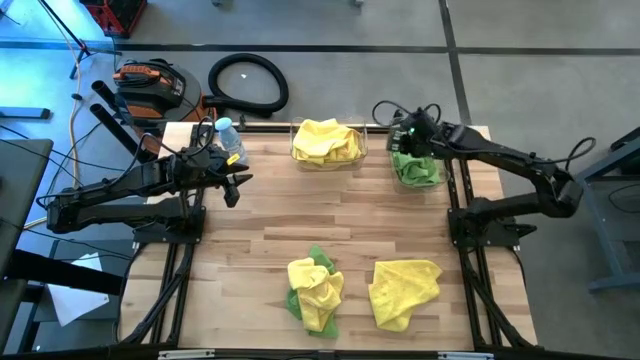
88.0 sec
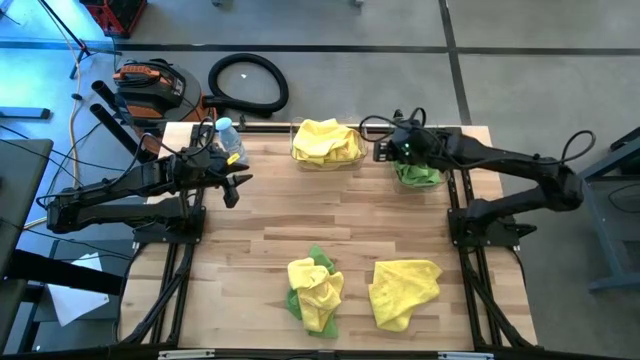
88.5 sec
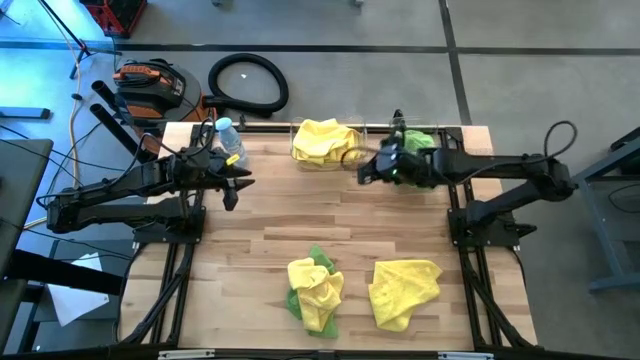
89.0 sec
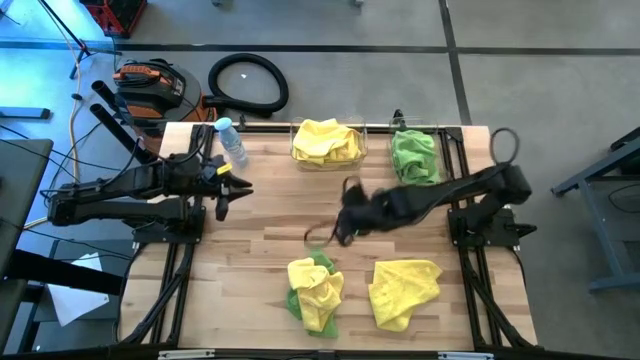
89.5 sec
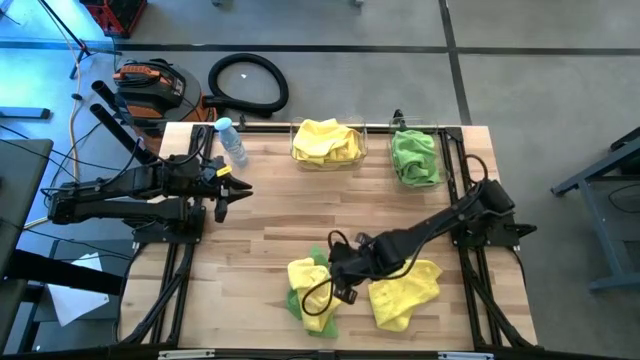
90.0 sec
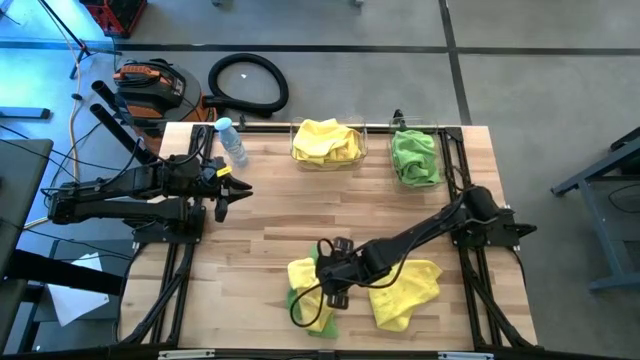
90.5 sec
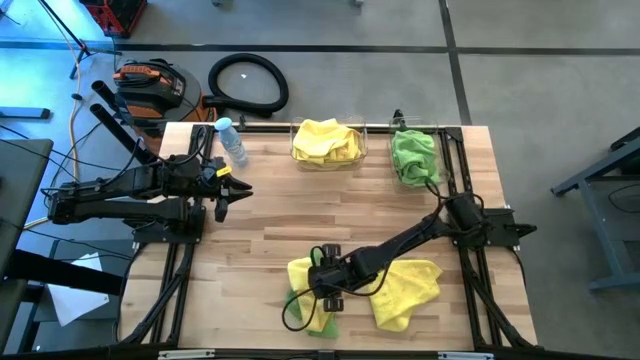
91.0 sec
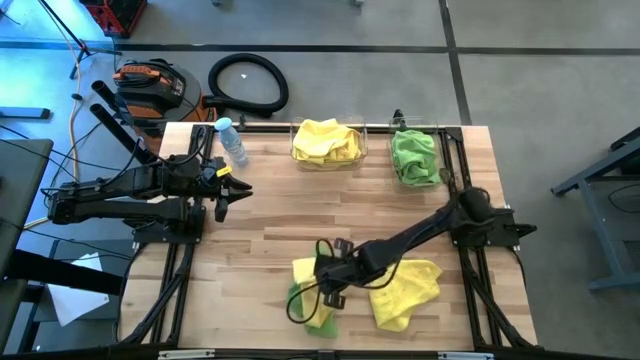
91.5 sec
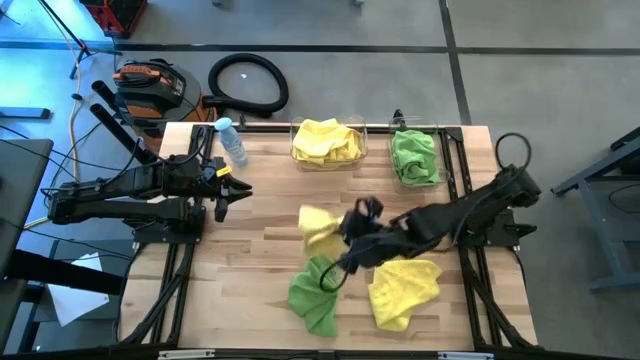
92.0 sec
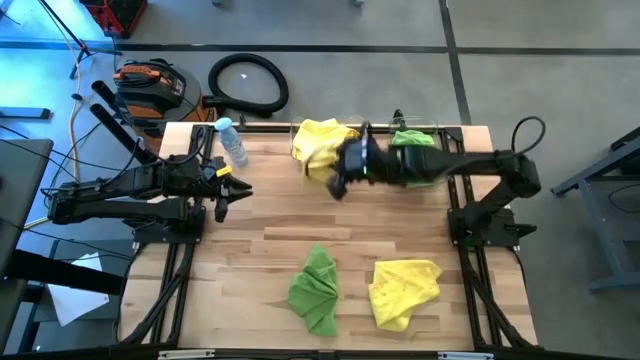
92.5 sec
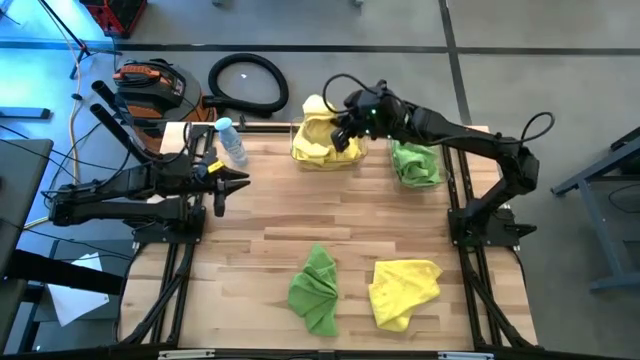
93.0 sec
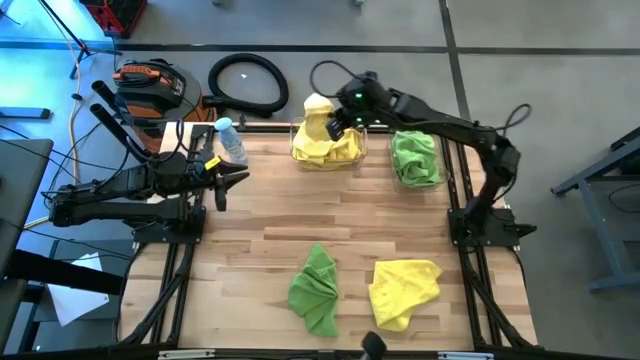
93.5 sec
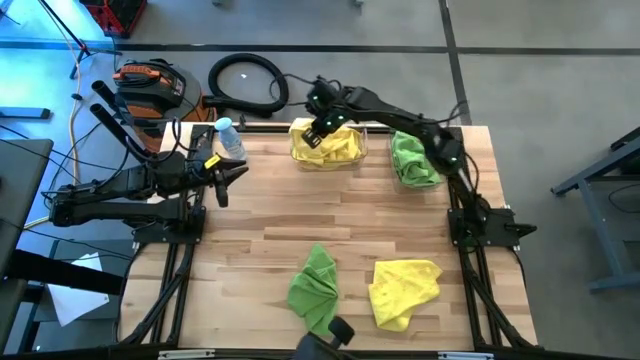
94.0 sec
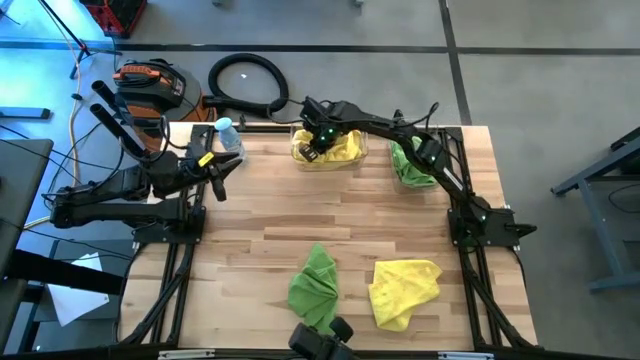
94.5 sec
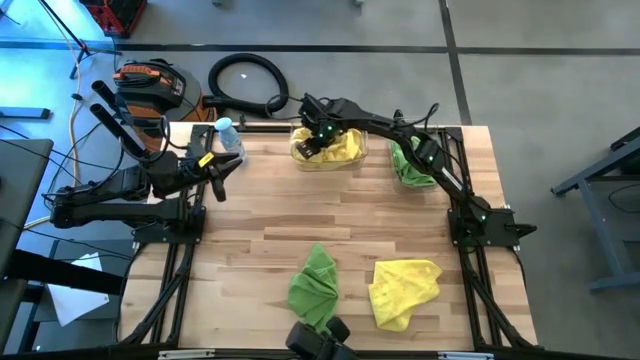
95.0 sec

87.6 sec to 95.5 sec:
Task: Sort microfiber towel by color & place in baskets
Put the left yellow microfiber cloth into the left transparent bin

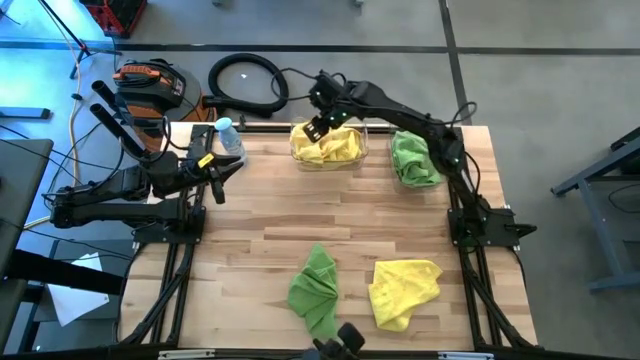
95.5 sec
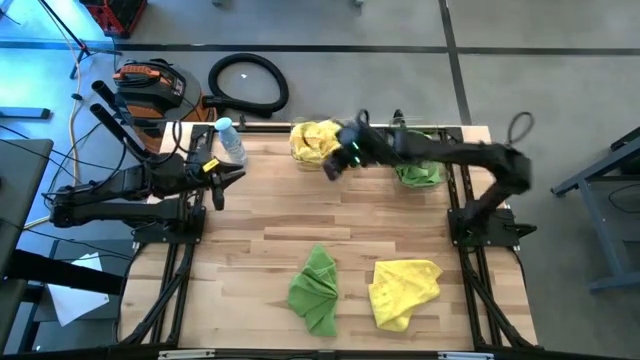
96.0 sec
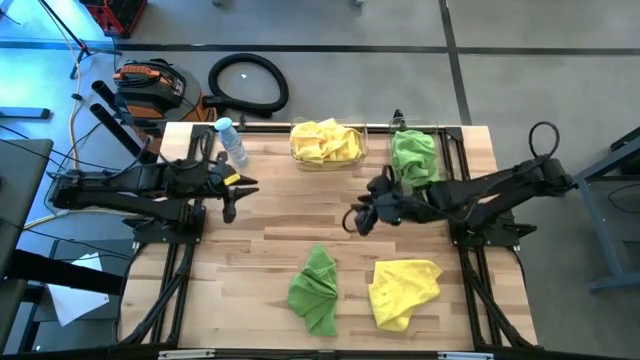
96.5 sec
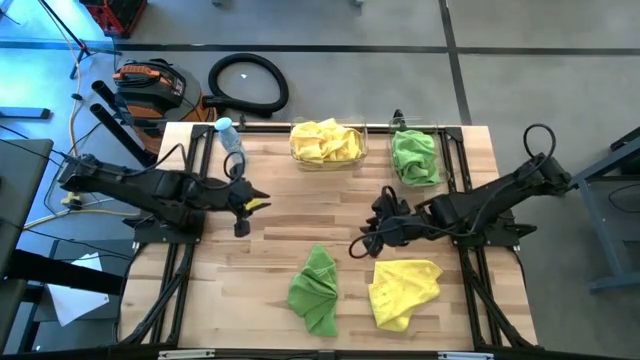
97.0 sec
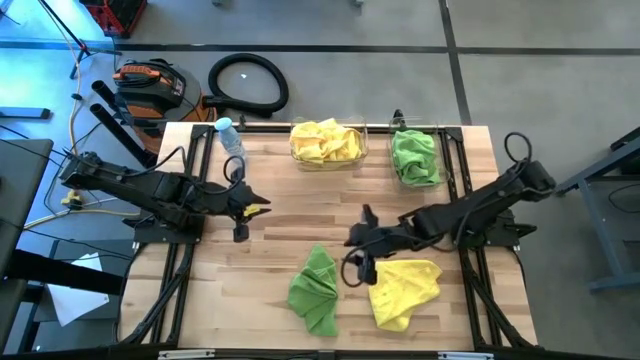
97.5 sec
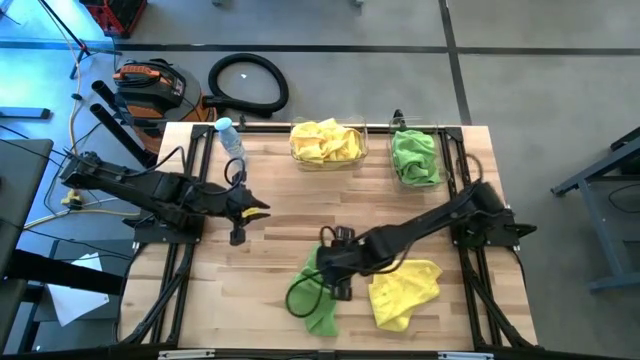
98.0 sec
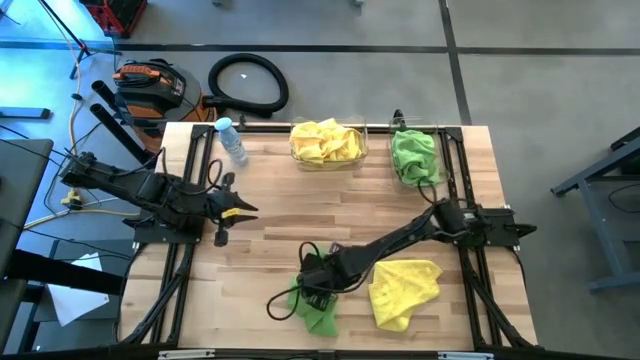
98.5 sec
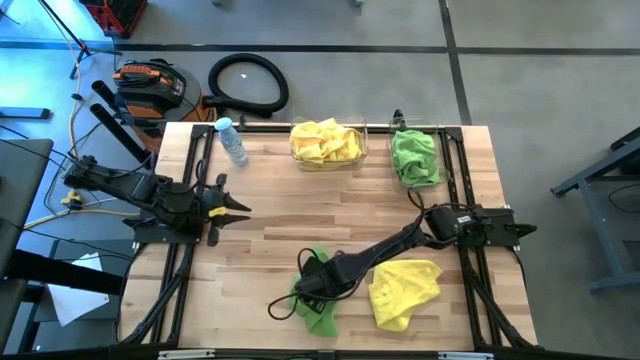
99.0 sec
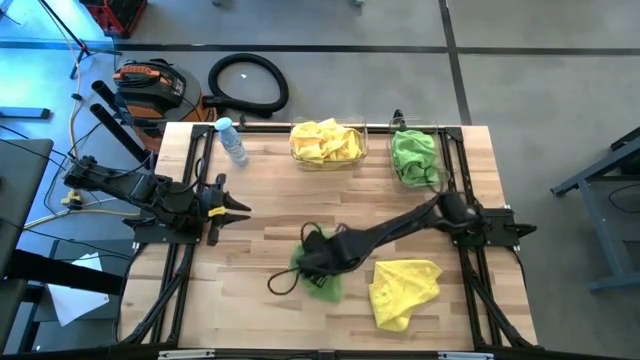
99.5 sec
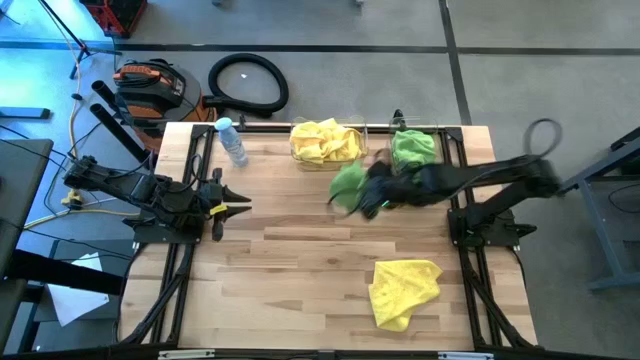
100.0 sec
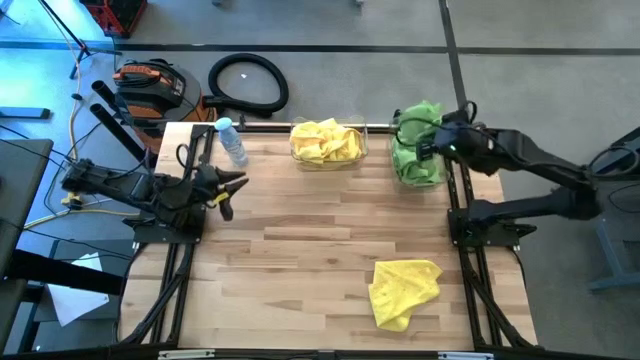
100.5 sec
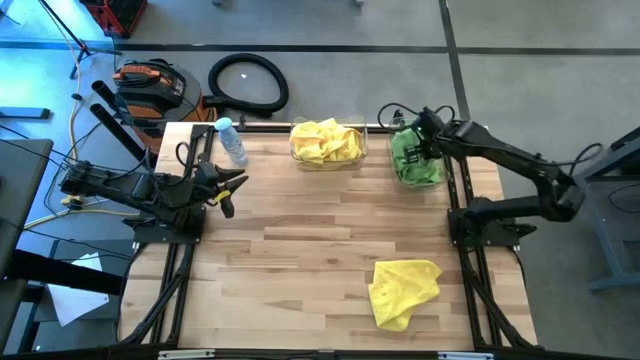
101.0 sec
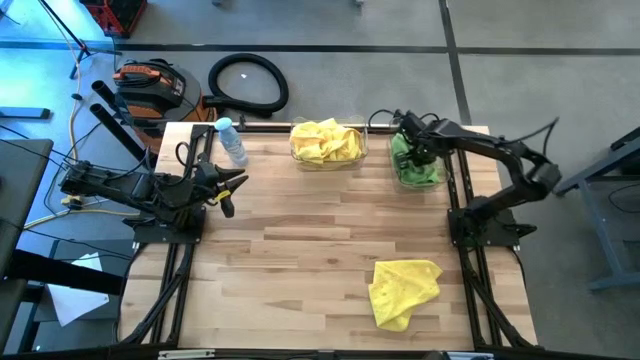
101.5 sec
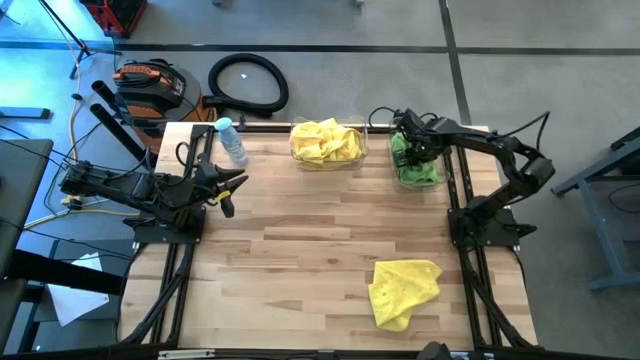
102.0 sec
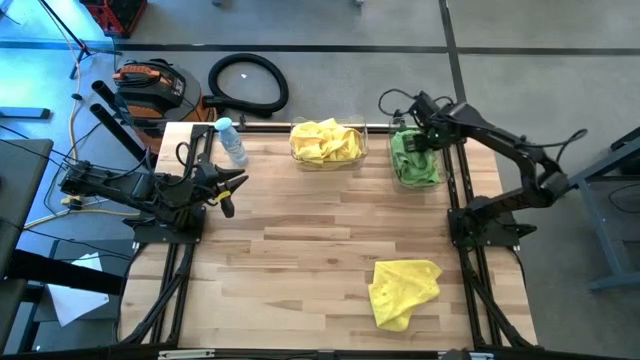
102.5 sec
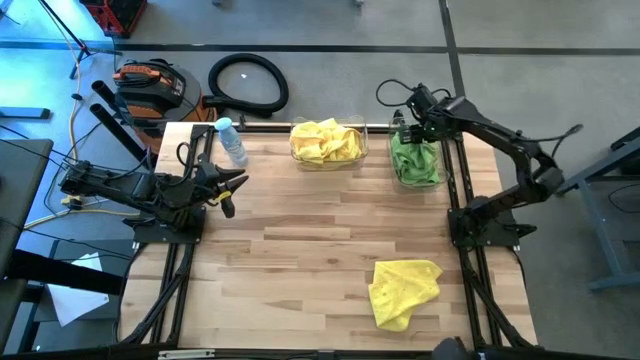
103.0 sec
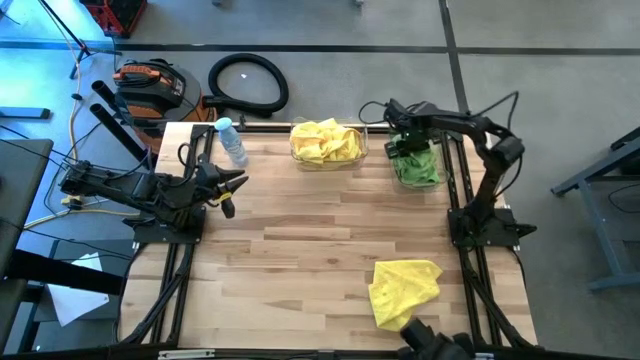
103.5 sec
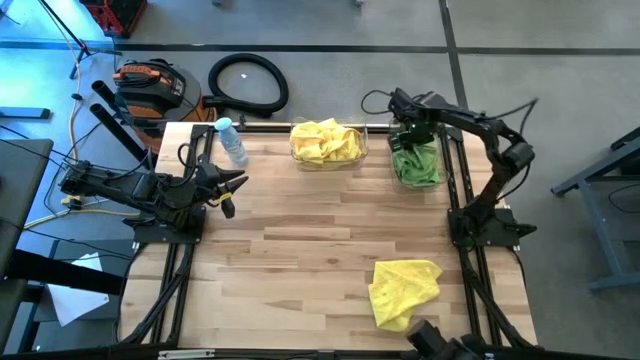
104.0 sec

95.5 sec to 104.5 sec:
Put the green microfiber cloth into the right transparent bin

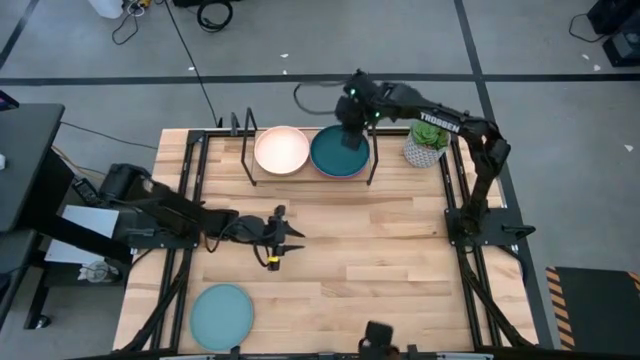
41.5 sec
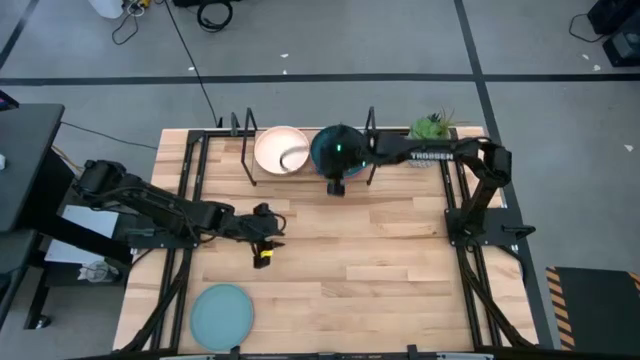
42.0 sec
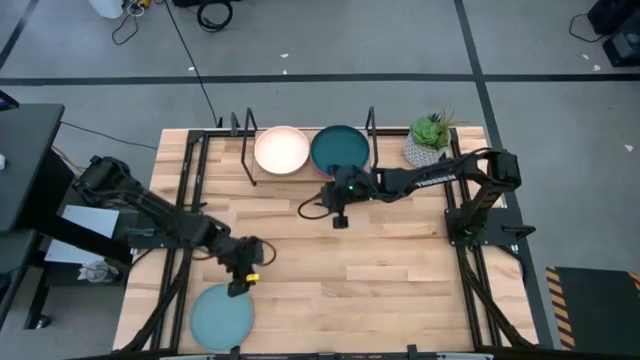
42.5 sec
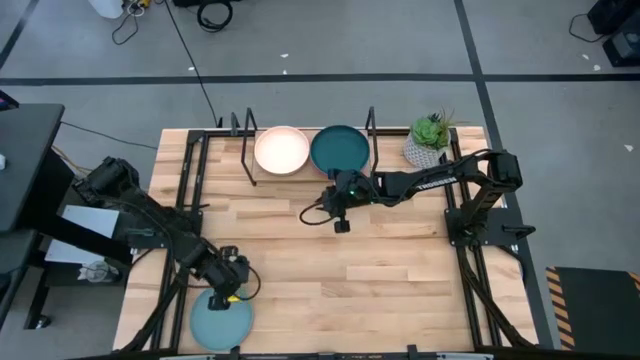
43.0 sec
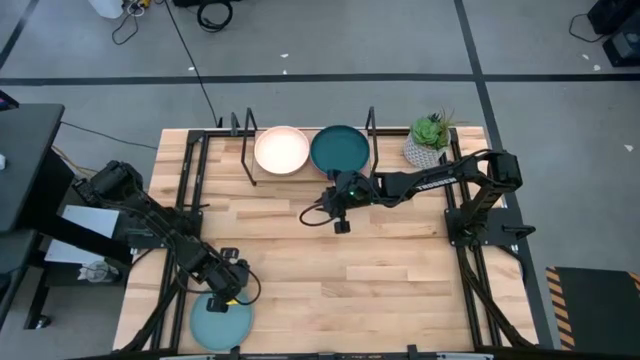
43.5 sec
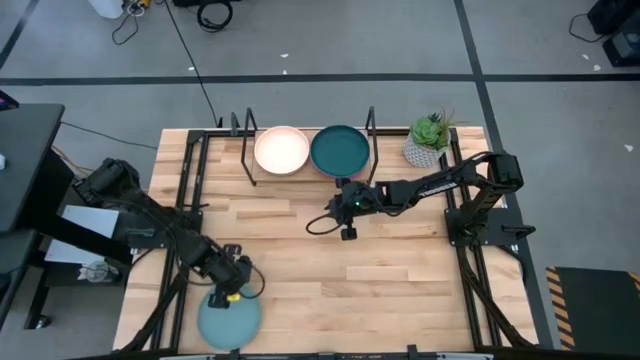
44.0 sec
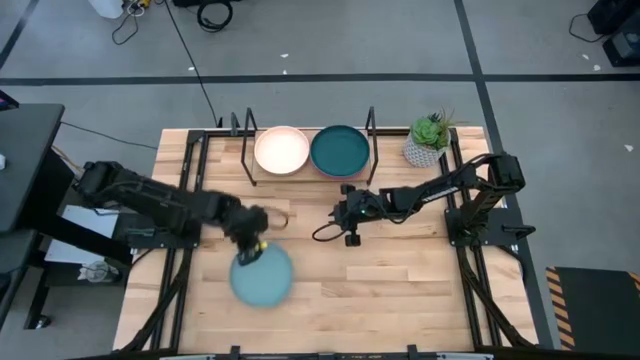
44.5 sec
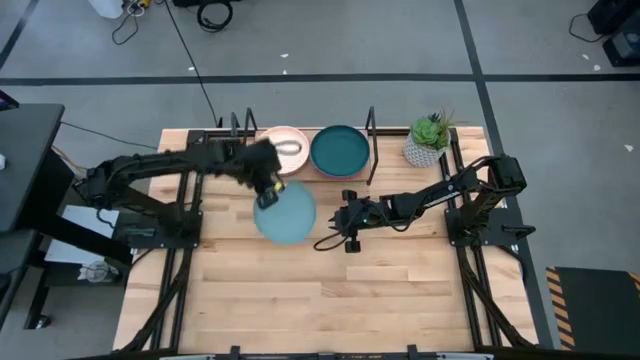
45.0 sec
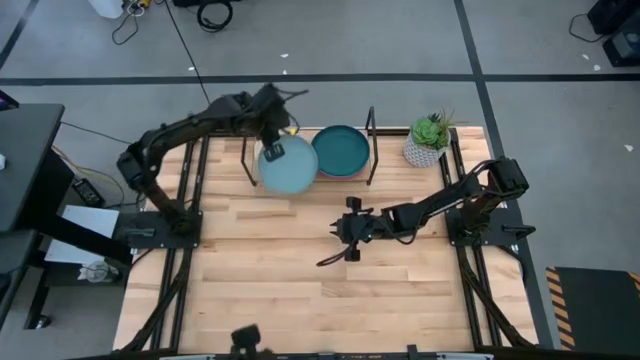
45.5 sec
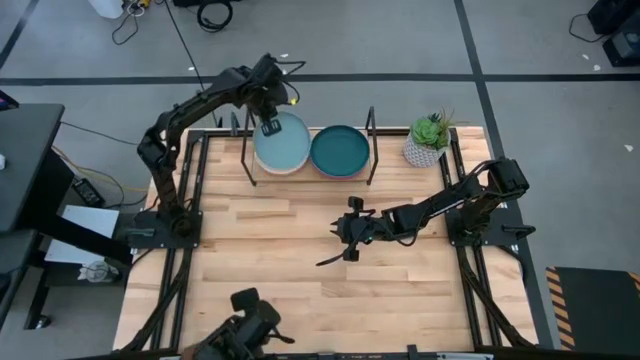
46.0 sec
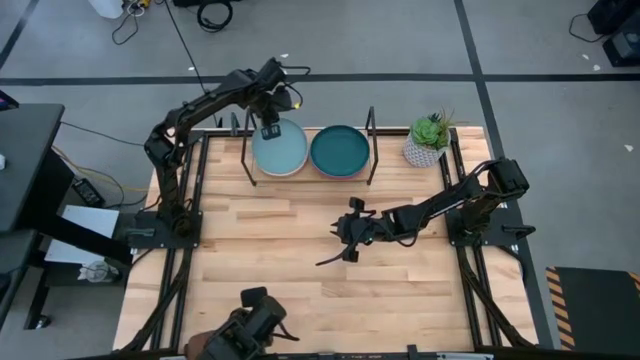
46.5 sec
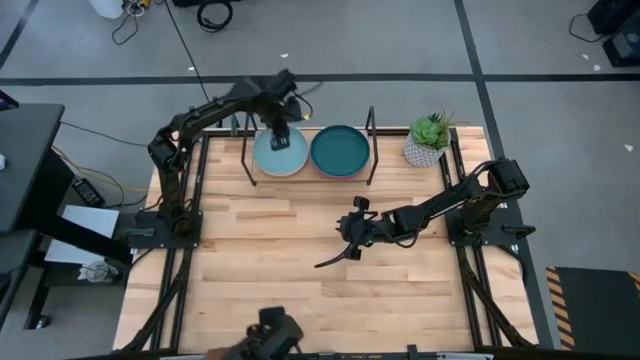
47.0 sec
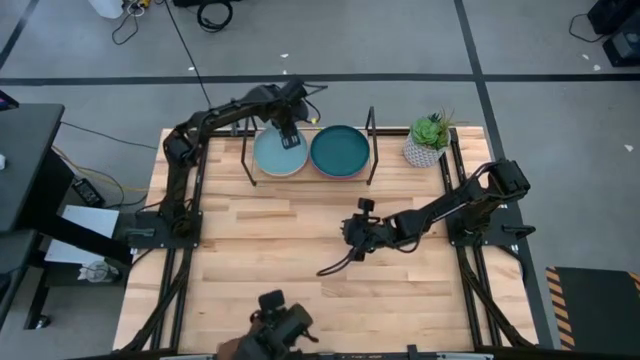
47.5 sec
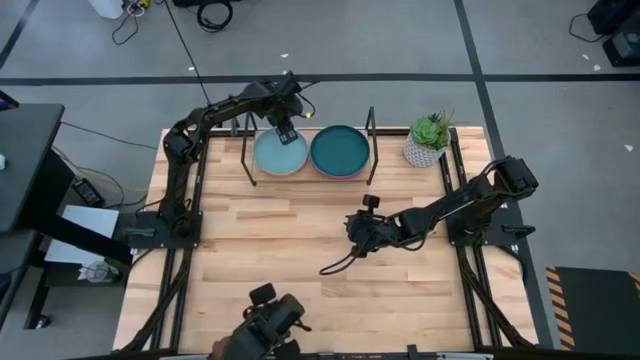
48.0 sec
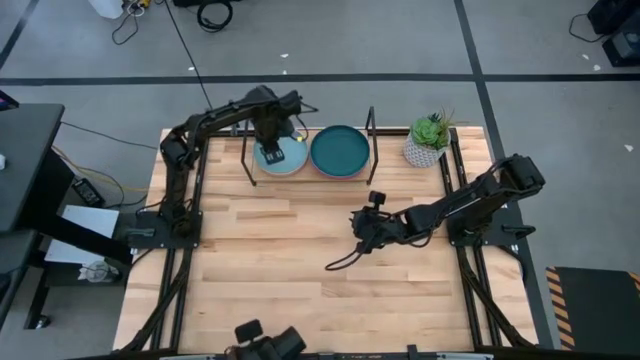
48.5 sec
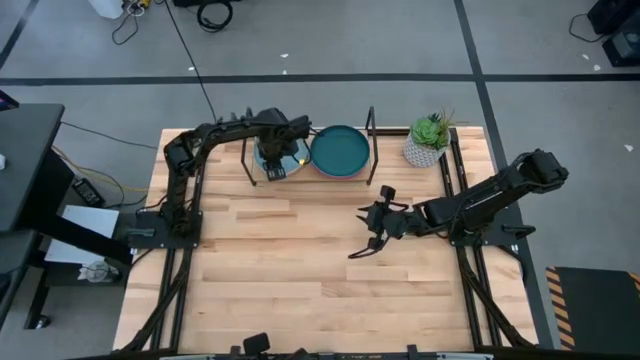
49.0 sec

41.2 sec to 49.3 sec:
Task: Place and stack plates onto a shelf
Stack the light blue plate on top of the white plate
